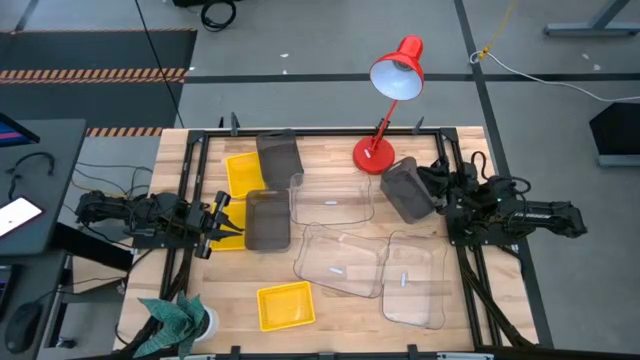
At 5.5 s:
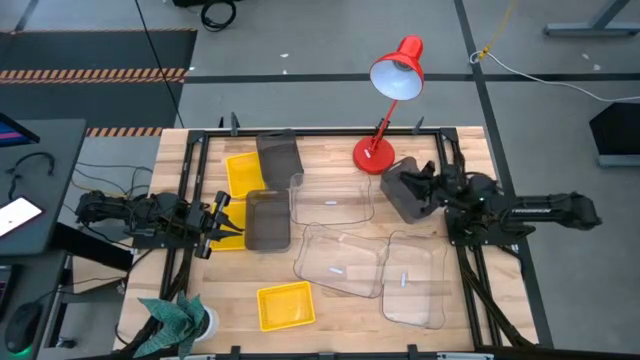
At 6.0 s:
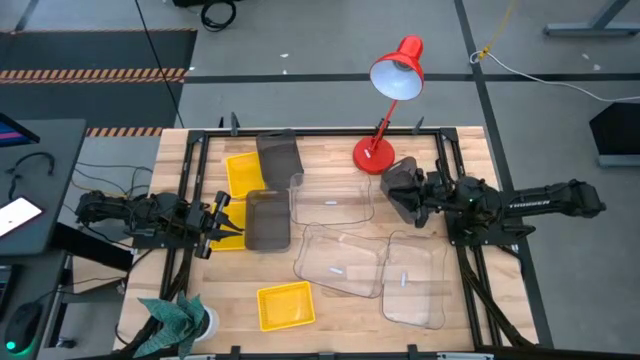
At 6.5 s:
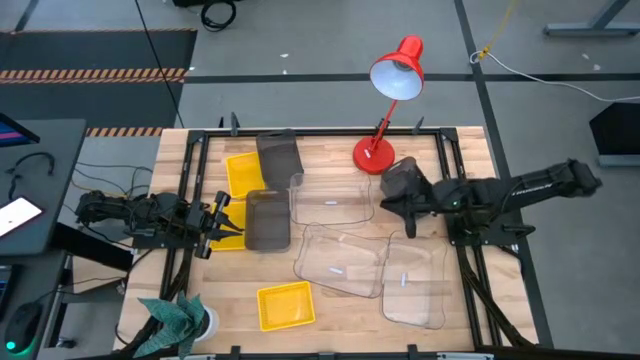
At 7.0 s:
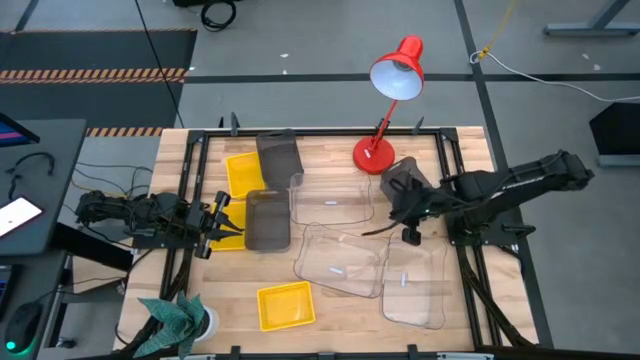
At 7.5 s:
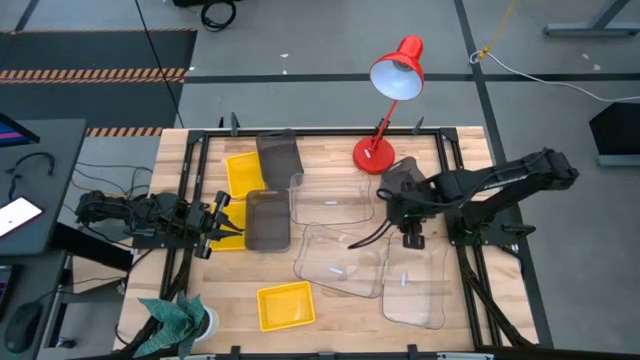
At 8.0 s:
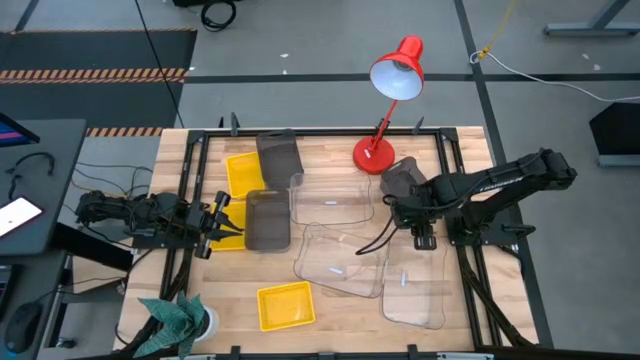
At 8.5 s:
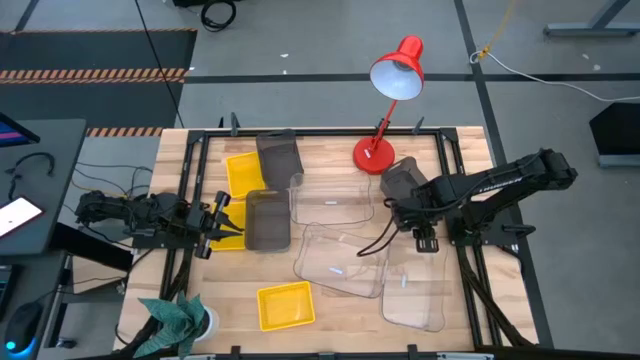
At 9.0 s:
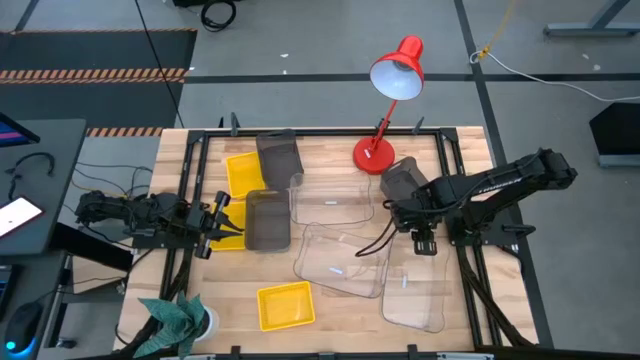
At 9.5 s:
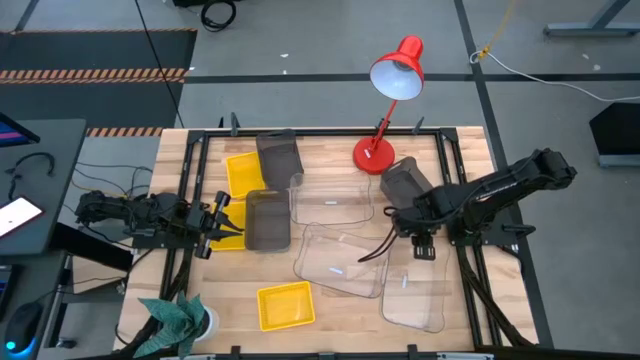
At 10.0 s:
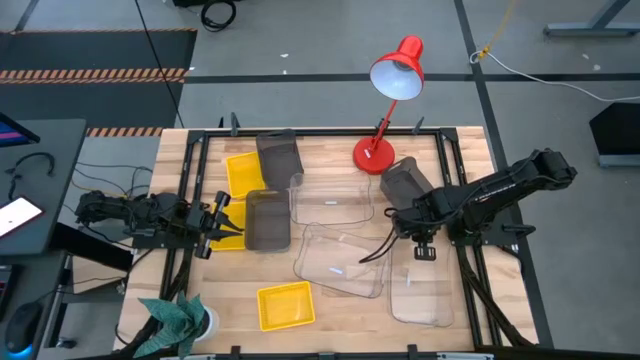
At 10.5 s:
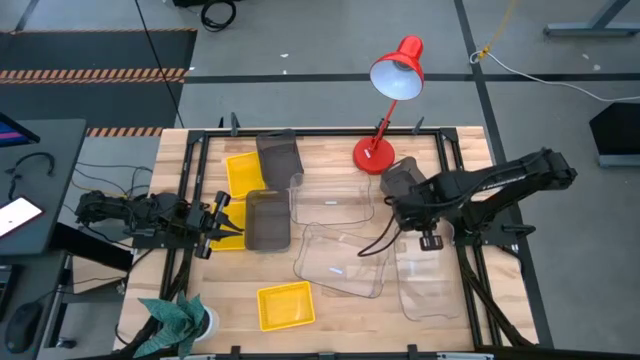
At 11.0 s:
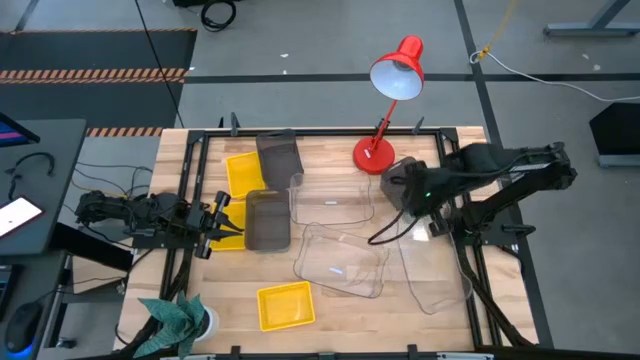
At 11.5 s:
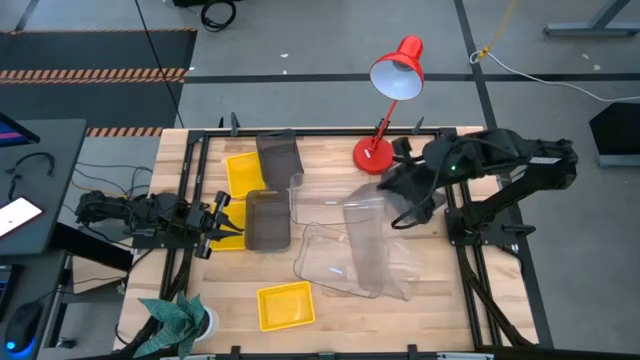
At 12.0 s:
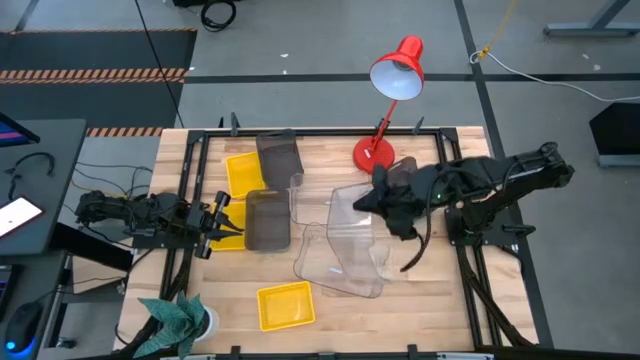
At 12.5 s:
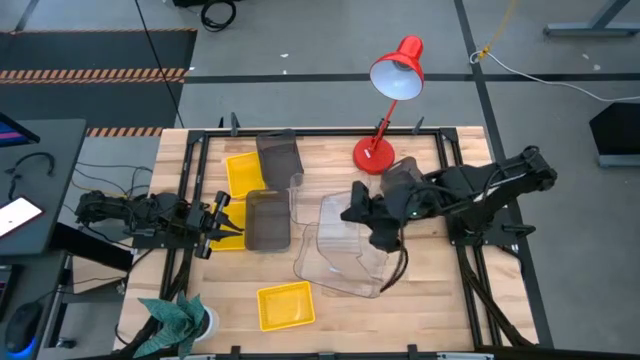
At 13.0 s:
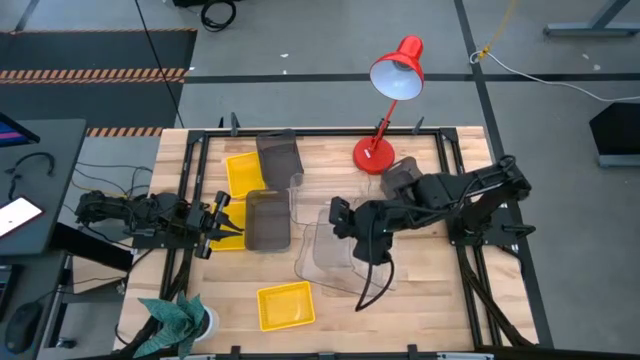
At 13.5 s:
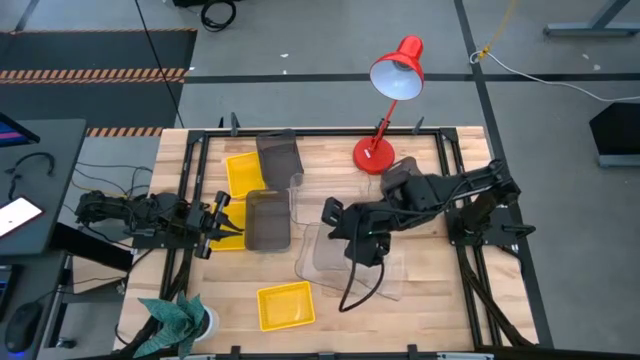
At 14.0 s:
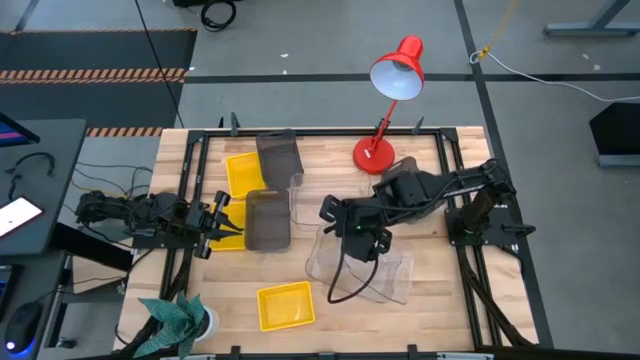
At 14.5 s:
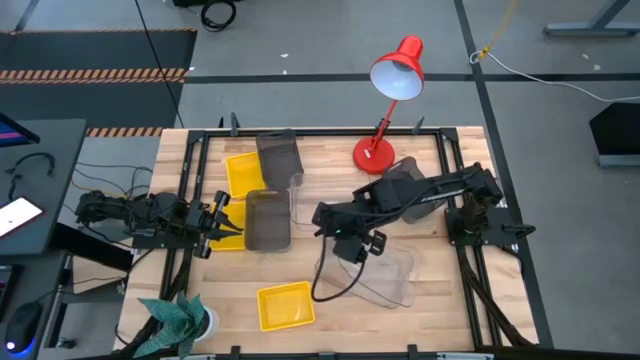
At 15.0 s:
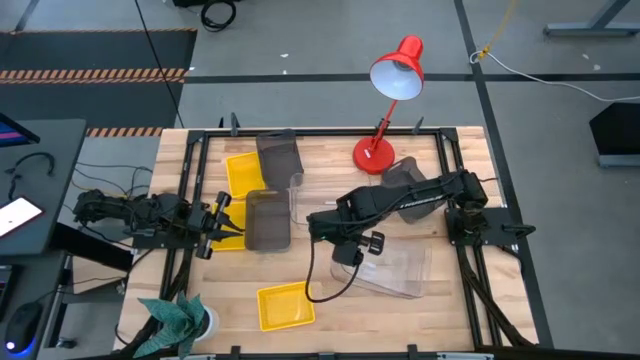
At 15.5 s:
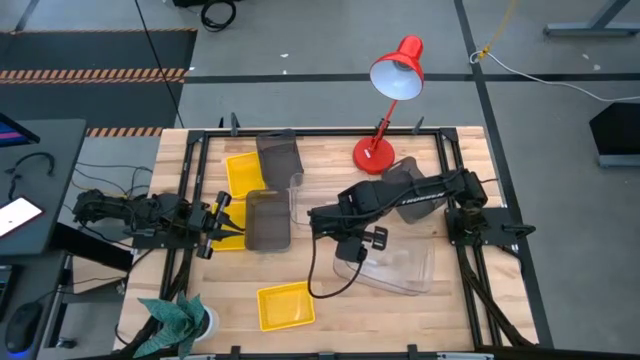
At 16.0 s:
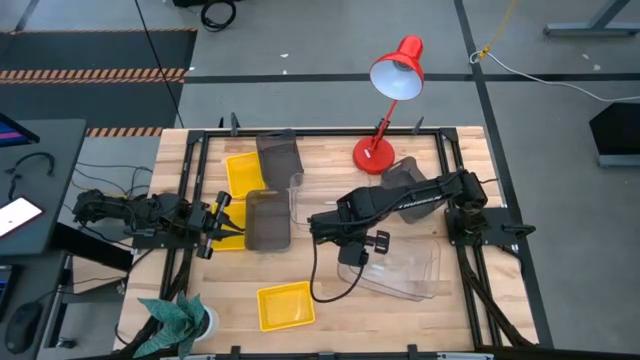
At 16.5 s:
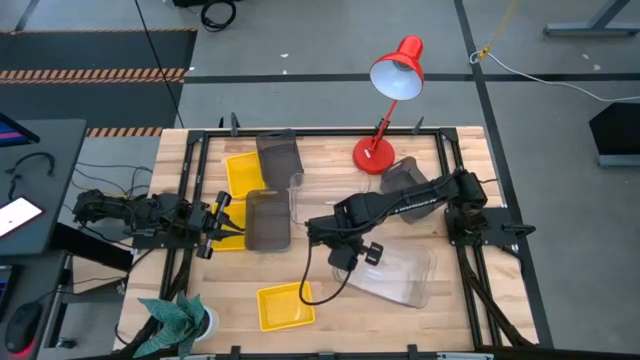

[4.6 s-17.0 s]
Stack the bottom right transparent bin on the bottom left transparent bin

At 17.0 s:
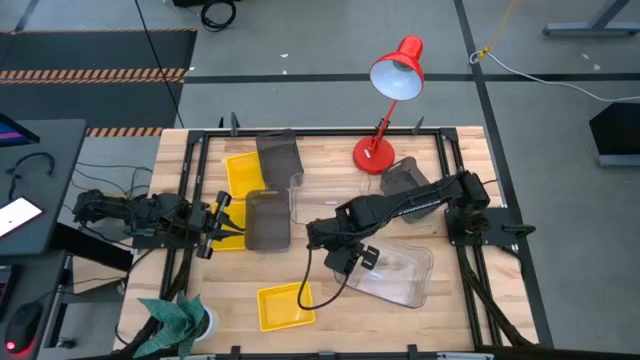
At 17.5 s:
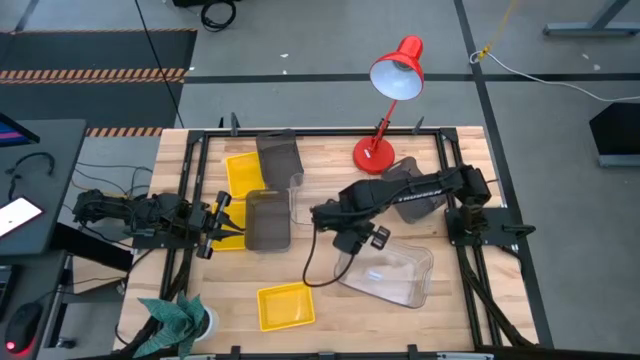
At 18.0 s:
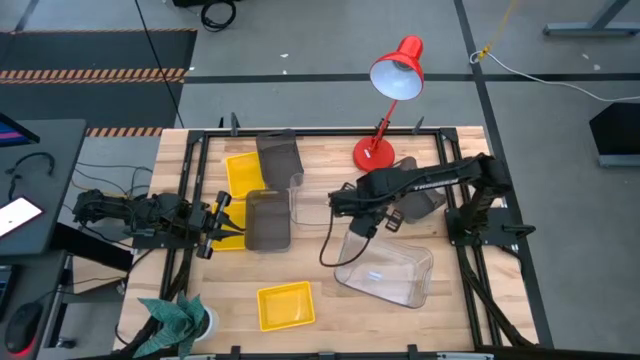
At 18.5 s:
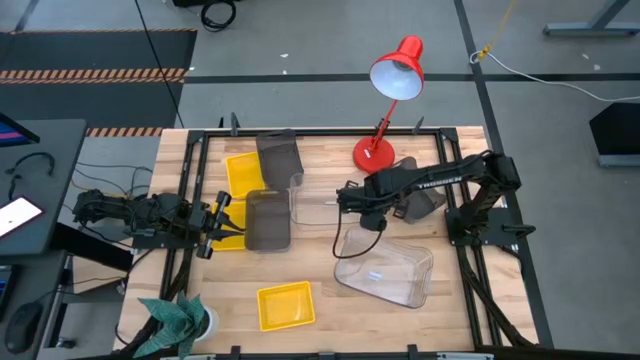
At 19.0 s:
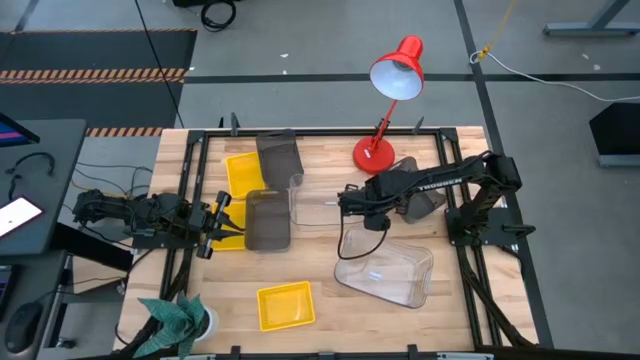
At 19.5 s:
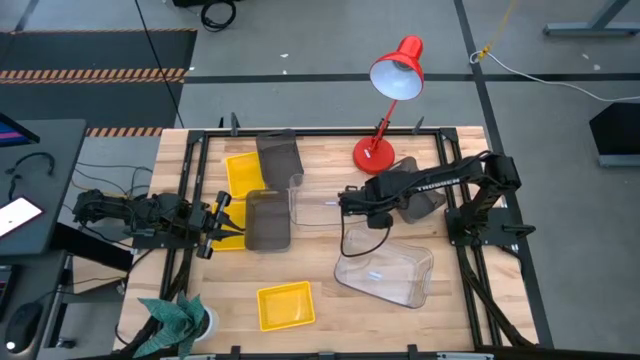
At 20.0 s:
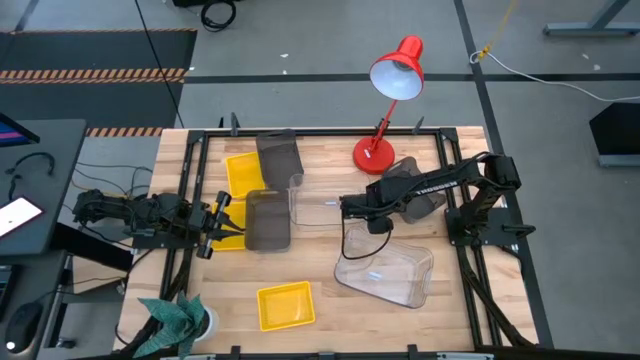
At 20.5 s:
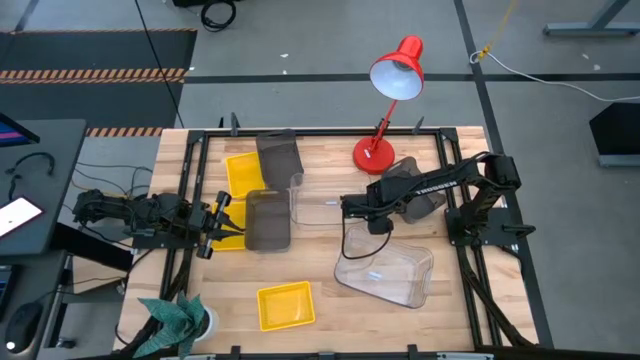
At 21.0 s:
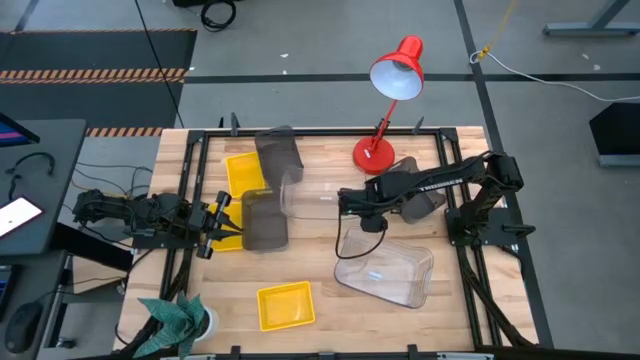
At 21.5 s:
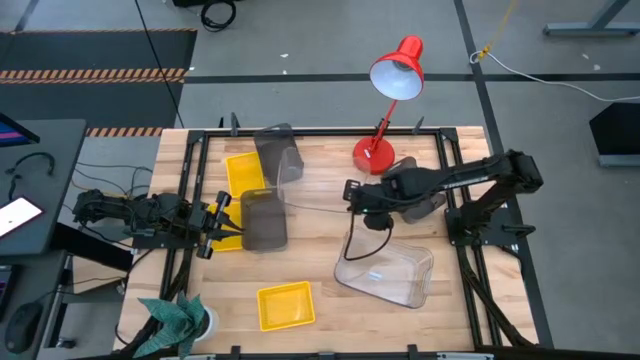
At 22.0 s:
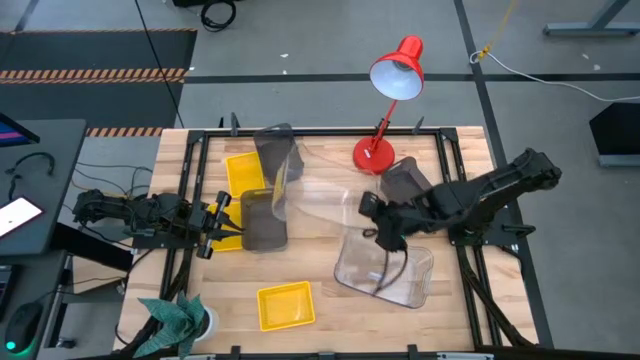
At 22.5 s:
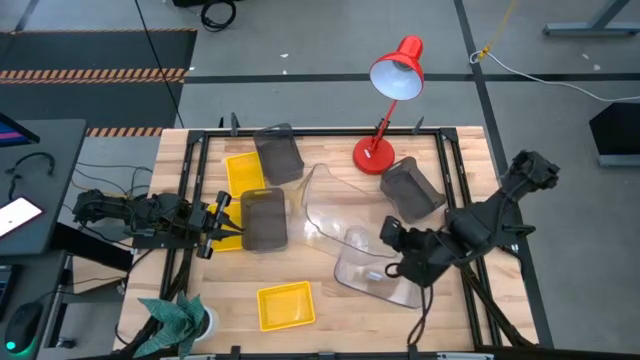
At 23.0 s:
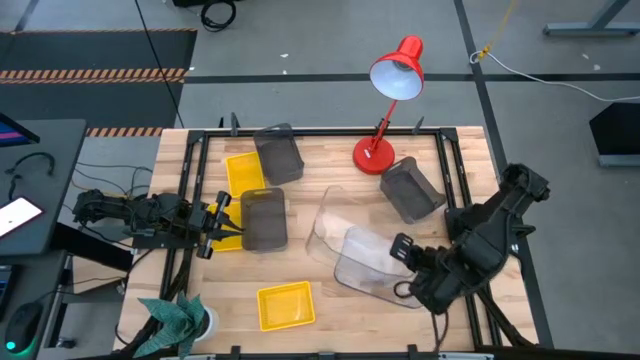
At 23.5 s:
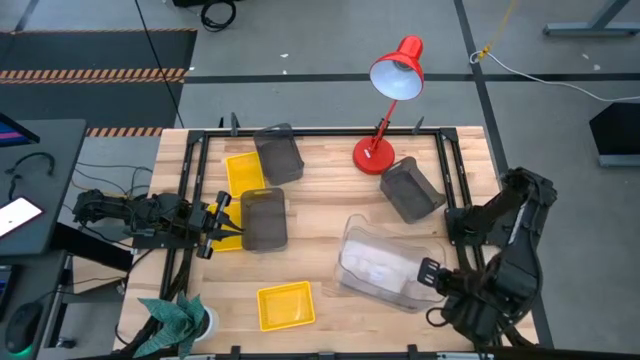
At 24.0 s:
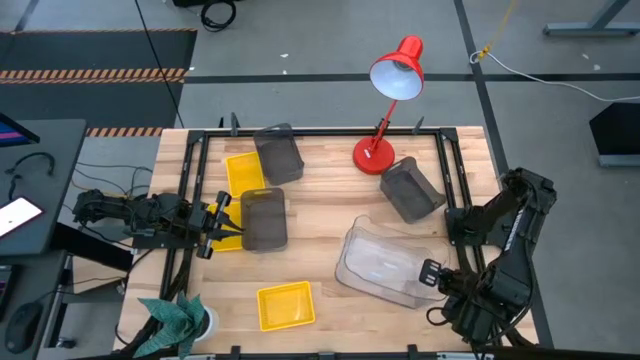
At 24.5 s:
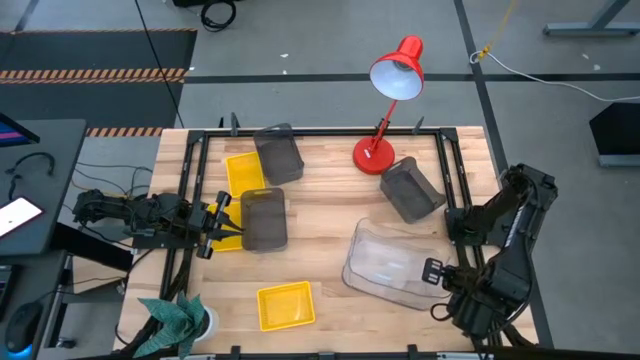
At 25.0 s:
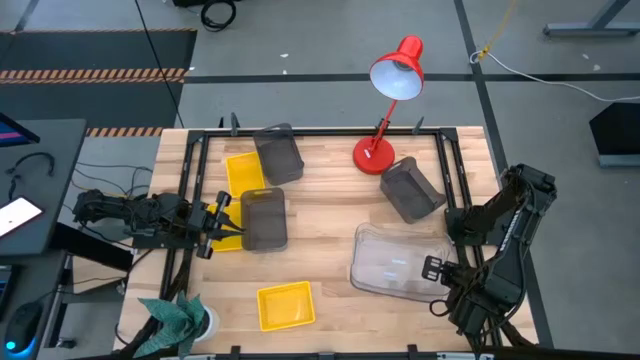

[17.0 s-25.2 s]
Stack the transparent bin on the stacked transparent bins
